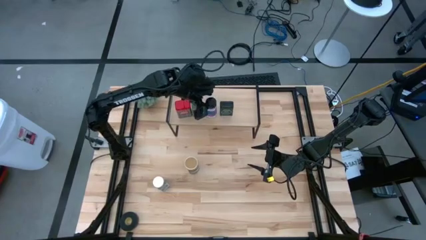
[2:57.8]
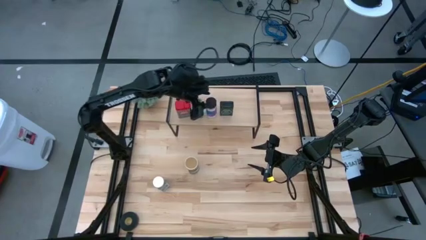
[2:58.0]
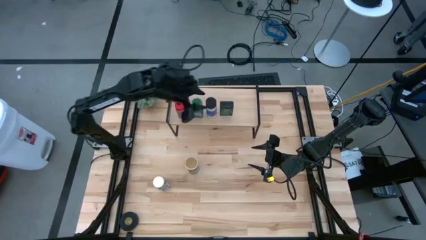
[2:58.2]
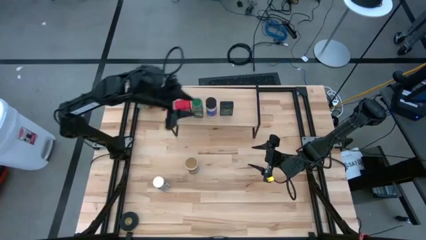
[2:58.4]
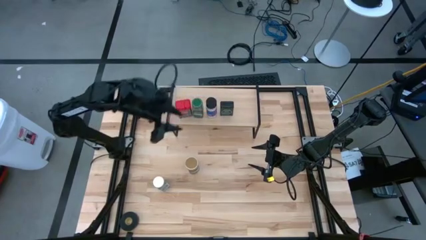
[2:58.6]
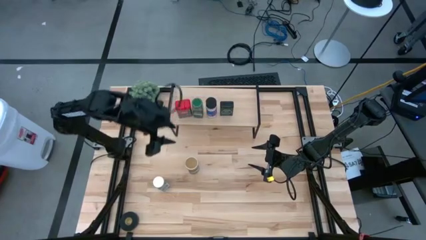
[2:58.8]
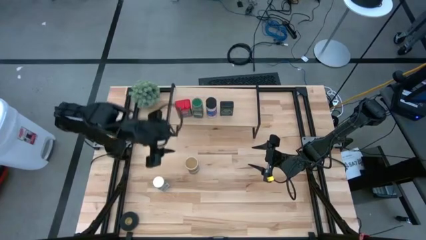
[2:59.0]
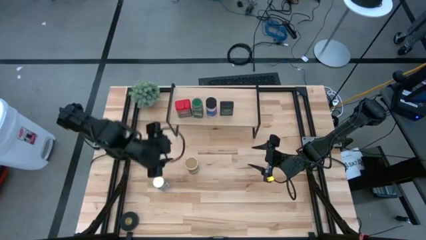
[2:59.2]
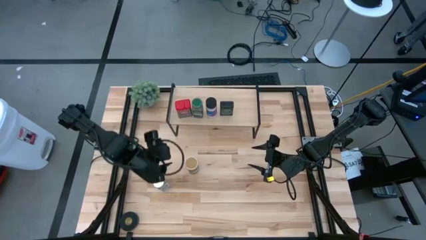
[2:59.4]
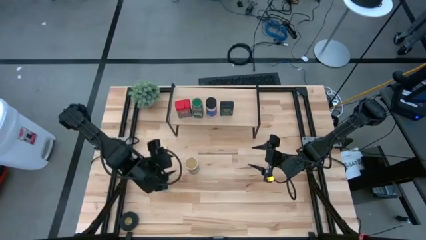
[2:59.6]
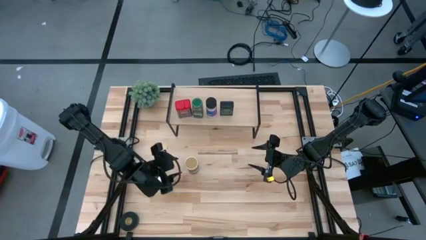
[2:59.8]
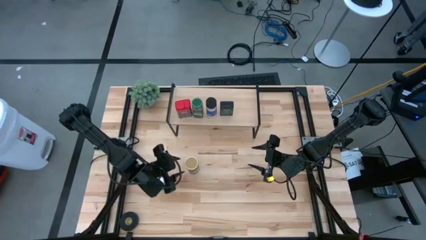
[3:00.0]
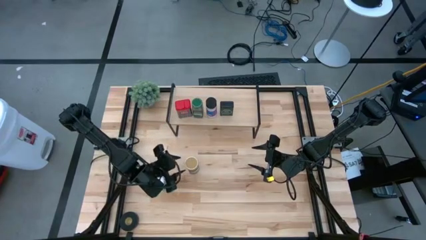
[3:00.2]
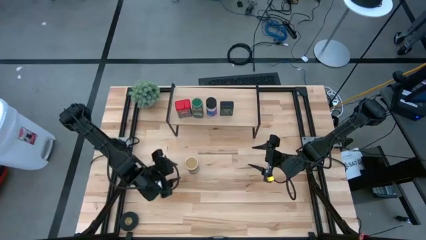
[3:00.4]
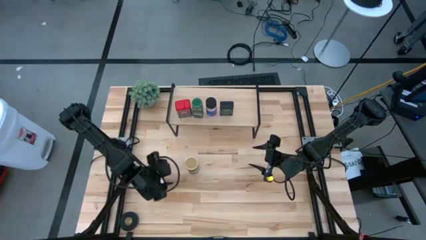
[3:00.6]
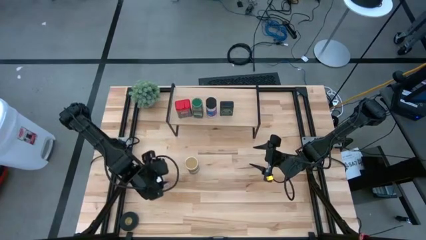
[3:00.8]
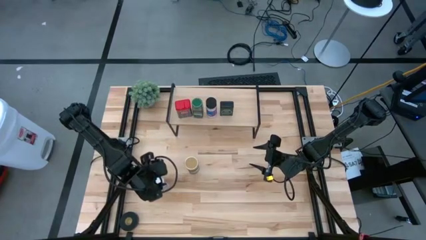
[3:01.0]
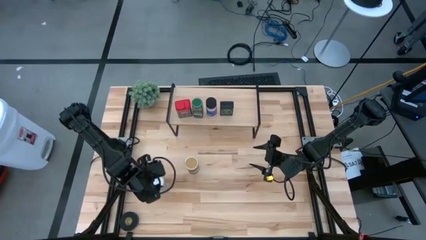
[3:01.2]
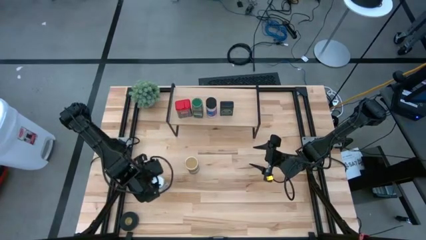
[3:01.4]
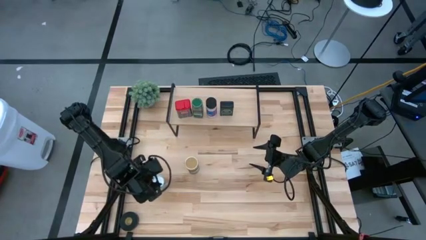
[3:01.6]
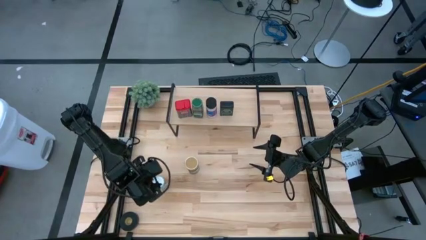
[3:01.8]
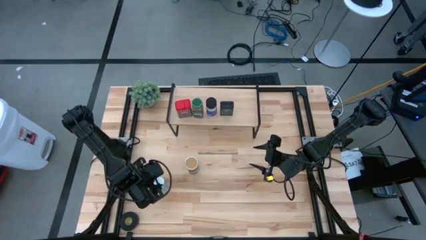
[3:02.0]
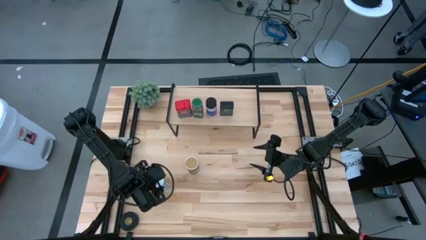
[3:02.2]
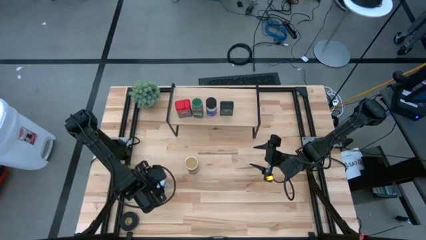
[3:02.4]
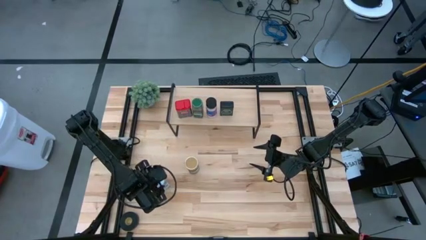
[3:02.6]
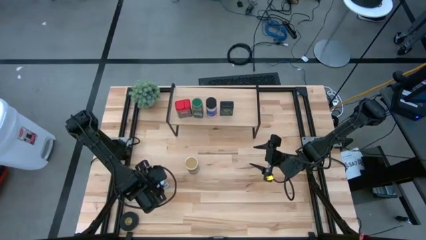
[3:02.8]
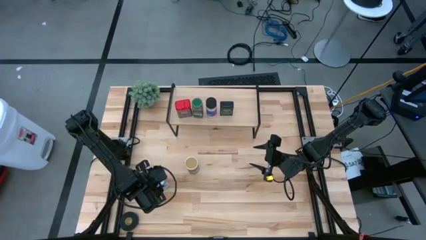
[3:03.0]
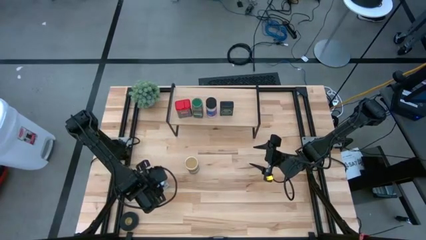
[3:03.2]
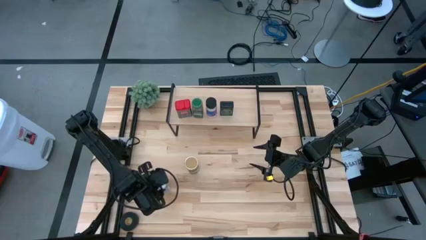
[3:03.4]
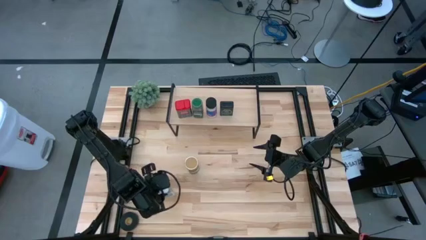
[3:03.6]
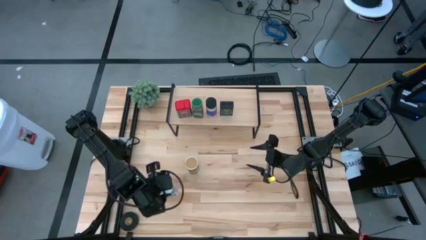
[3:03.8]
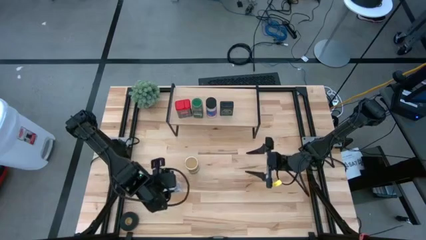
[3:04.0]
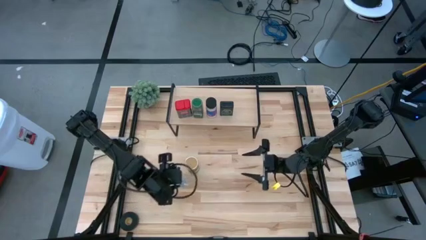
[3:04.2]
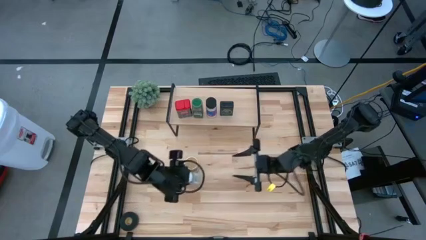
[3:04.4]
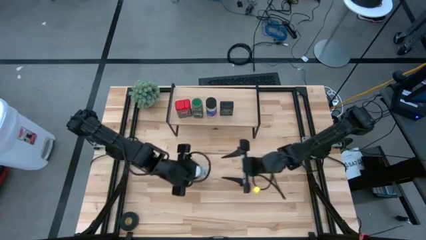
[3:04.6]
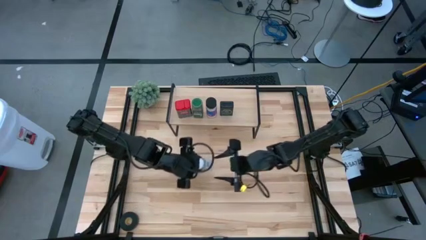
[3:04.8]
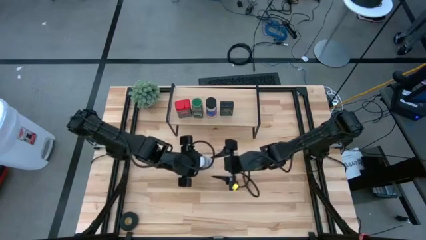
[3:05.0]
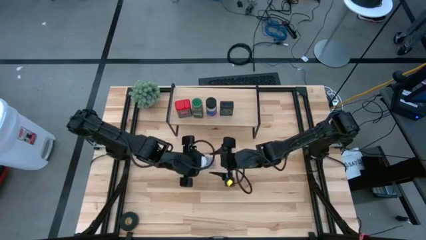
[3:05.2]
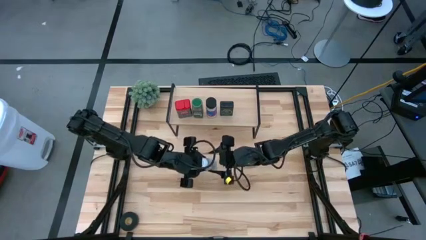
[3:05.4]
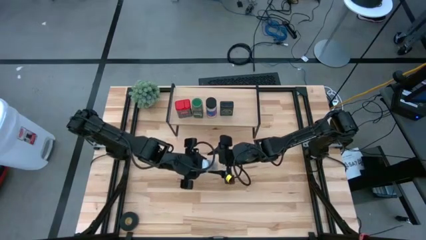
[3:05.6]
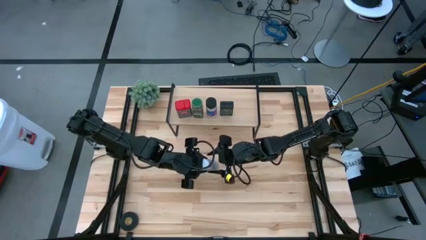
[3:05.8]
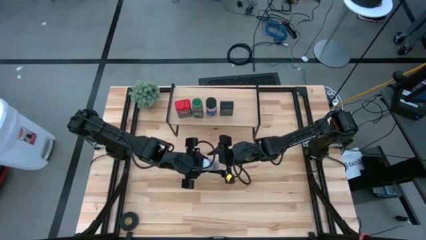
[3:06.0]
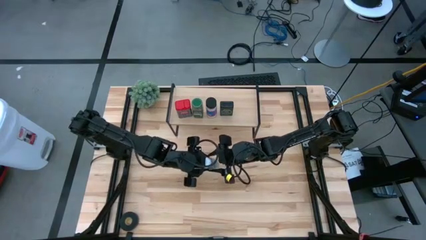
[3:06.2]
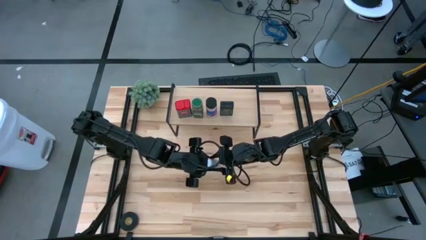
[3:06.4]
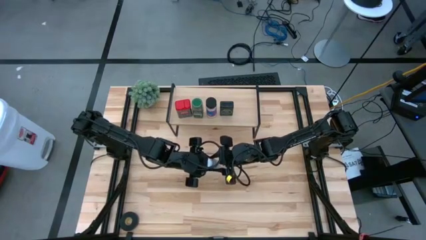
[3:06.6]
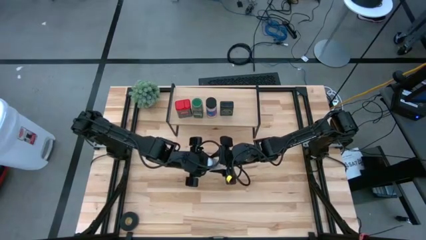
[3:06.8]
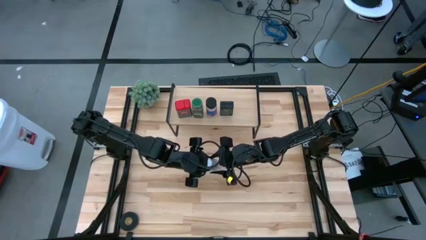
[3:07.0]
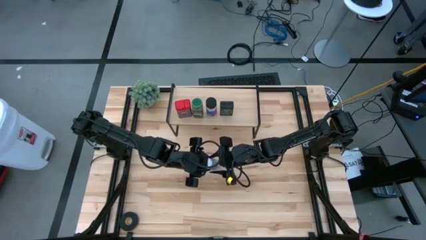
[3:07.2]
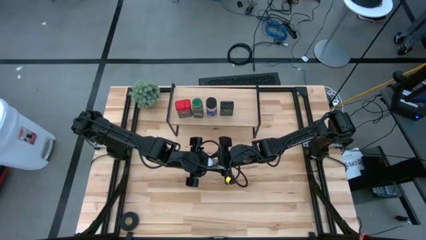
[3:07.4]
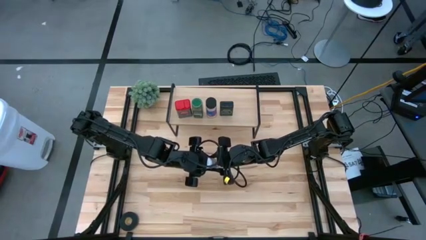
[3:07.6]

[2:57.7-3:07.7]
Task: Shelf spices
Put the white seasoning bottle on the shelf aligned with the other black seasoning can

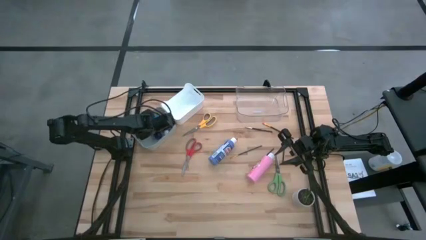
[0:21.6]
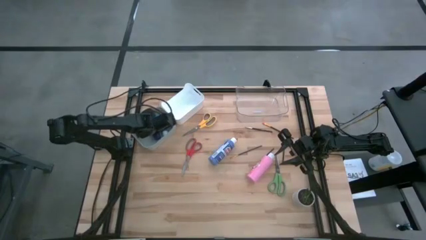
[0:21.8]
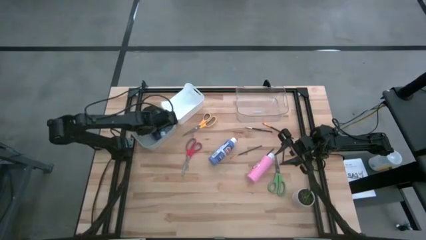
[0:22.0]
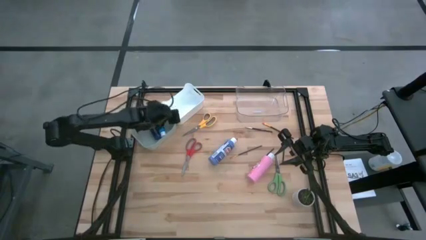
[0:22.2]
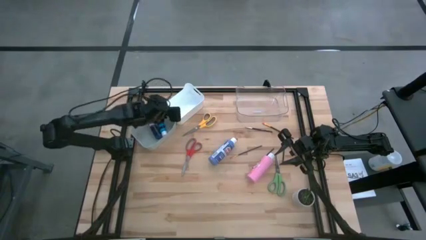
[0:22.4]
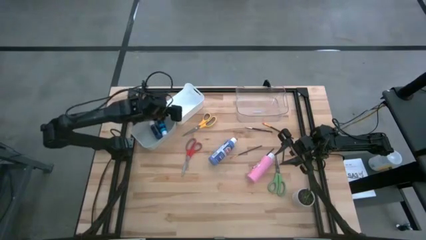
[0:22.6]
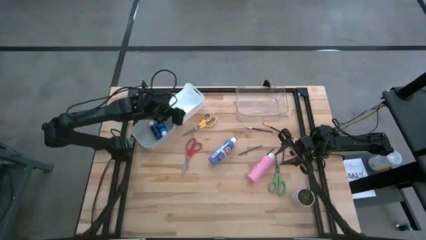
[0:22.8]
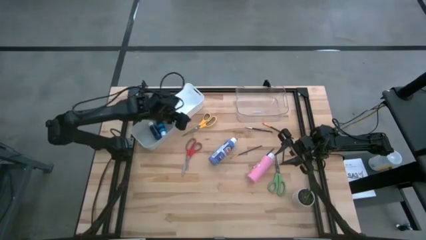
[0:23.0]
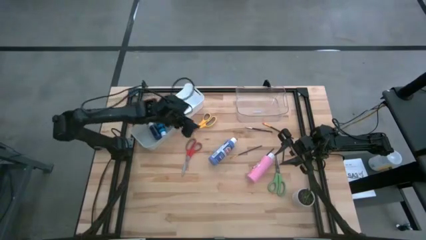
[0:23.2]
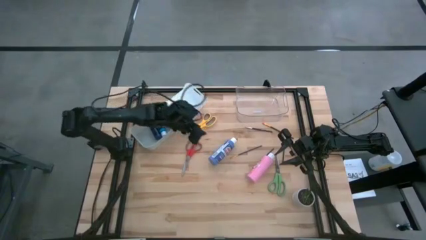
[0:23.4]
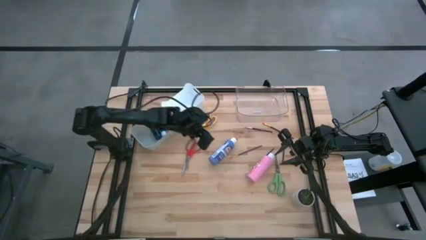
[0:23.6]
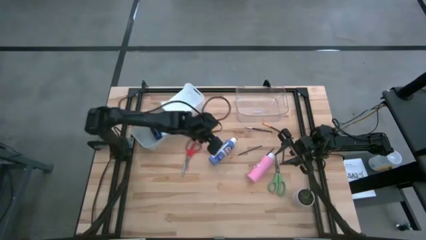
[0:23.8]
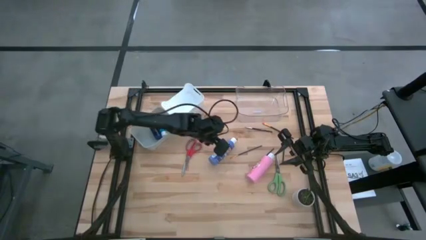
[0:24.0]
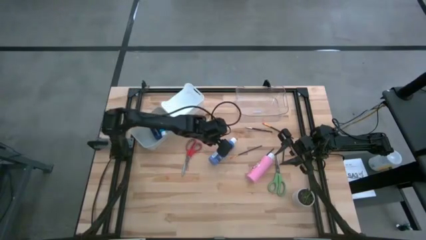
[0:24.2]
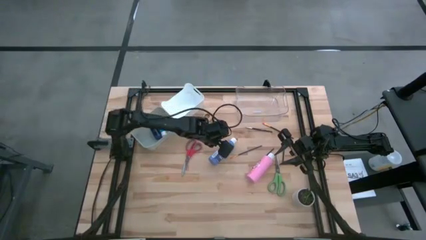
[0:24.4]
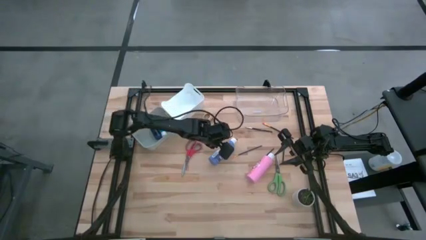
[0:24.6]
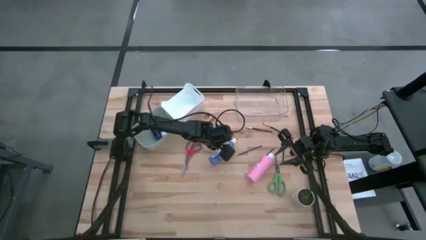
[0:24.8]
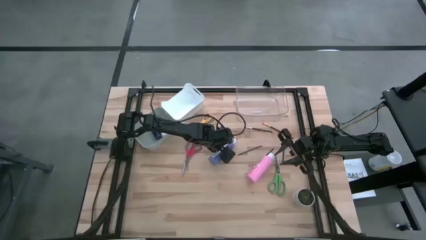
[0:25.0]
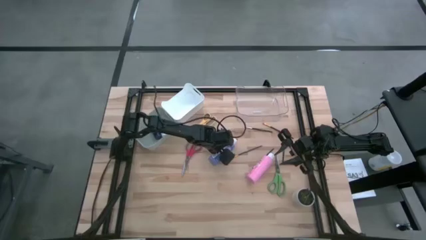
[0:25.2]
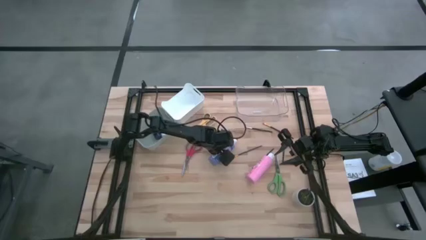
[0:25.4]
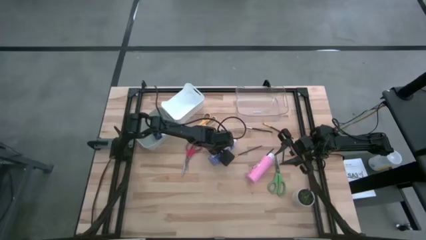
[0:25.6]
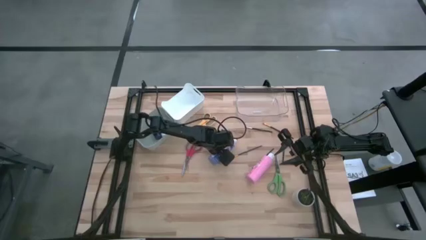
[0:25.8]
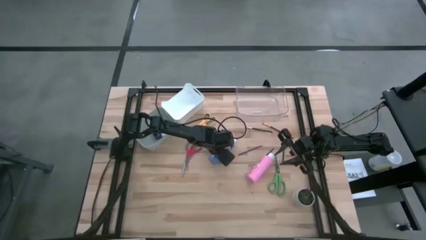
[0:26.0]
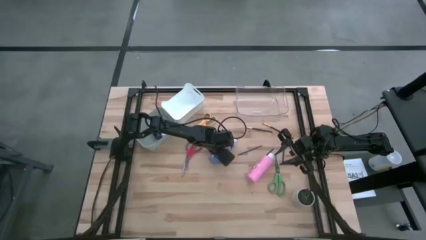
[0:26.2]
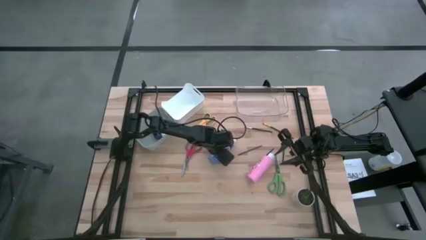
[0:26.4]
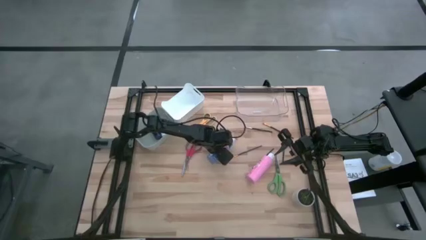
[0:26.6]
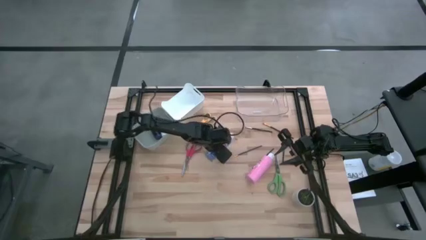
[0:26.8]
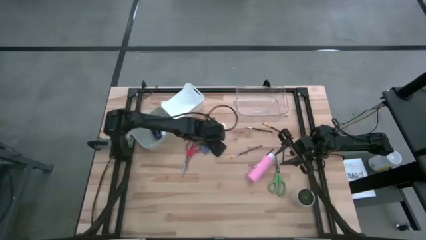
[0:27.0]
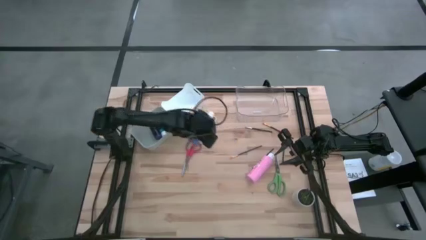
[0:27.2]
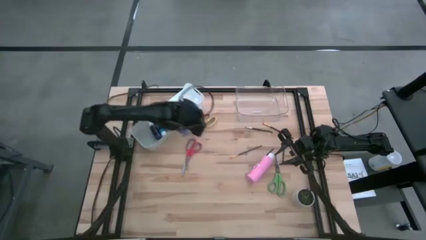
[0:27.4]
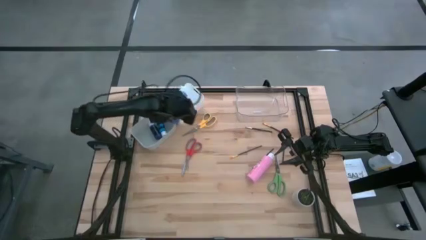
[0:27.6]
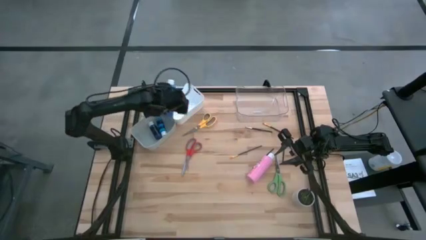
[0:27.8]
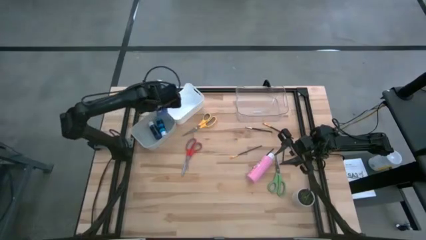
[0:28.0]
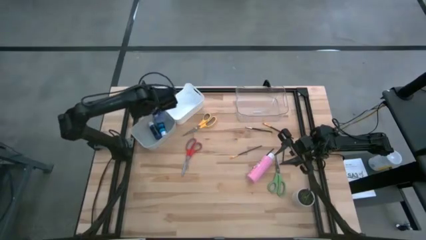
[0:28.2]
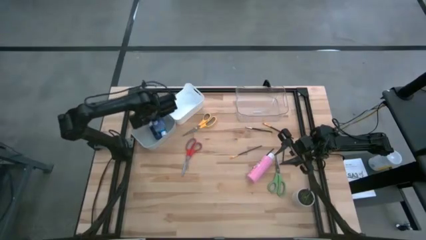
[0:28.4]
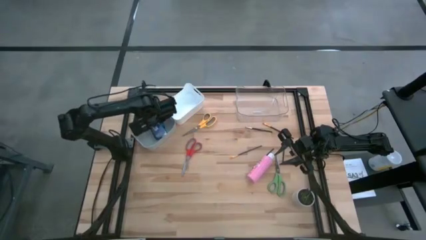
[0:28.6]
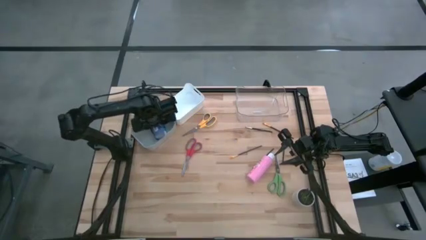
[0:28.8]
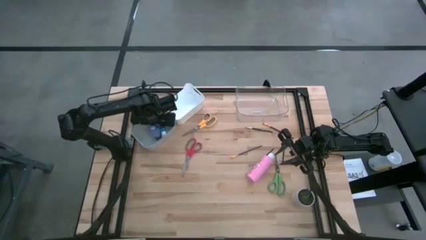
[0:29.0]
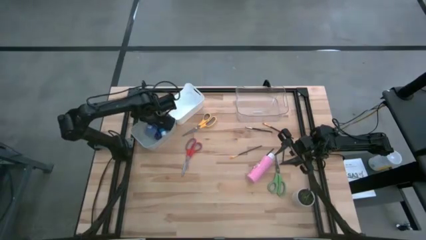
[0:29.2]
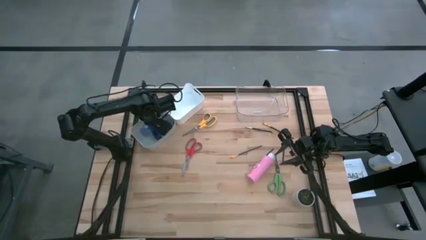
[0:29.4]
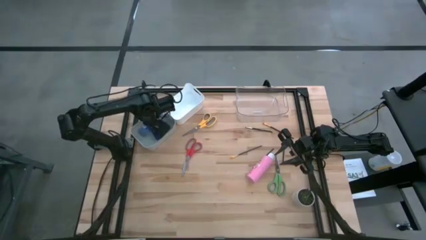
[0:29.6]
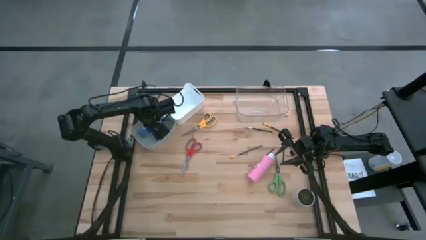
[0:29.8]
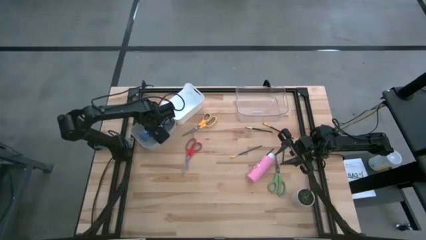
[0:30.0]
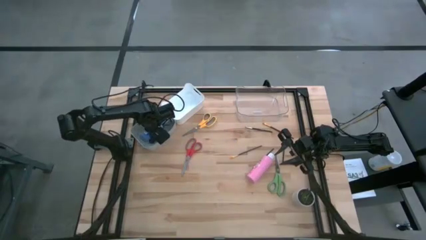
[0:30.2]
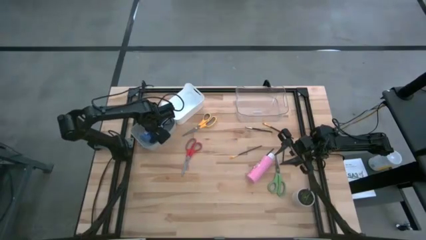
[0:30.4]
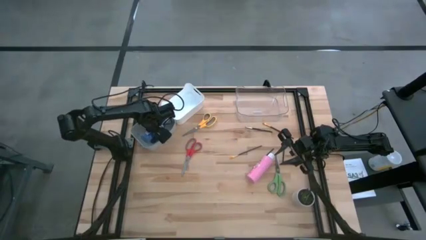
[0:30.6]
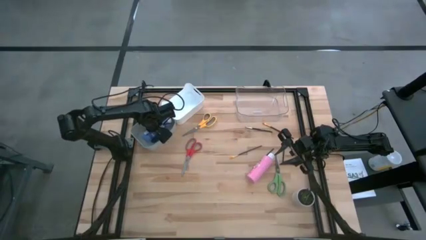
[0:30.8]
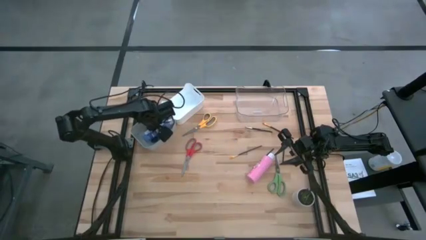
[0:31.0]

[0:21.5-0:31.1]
Task: Pick & Place Paint Supplies
Put the violet paint bottle into the gray bin
